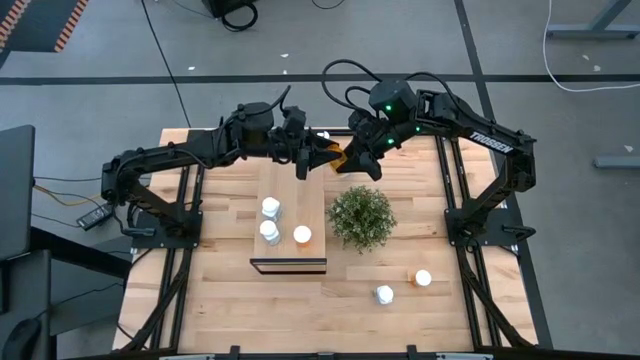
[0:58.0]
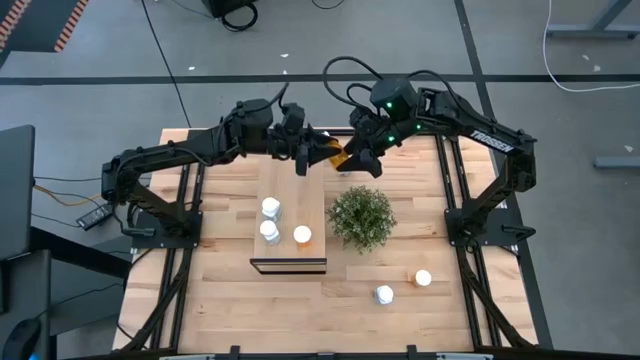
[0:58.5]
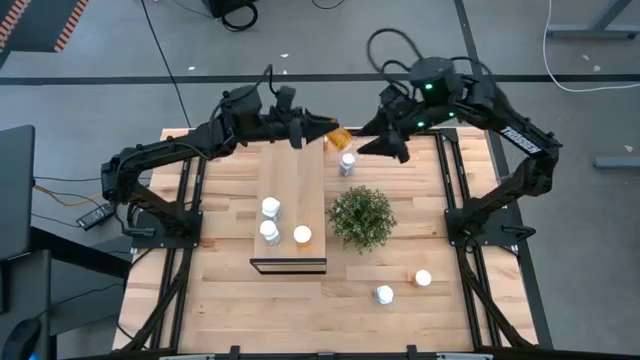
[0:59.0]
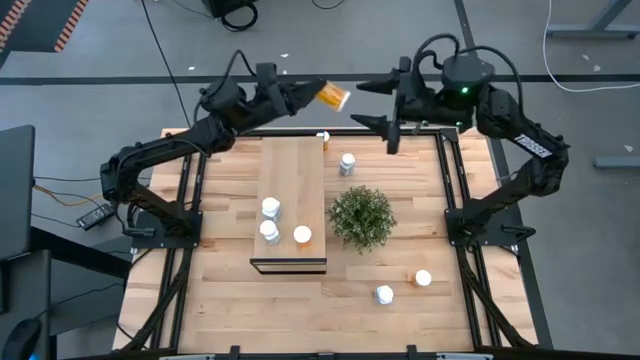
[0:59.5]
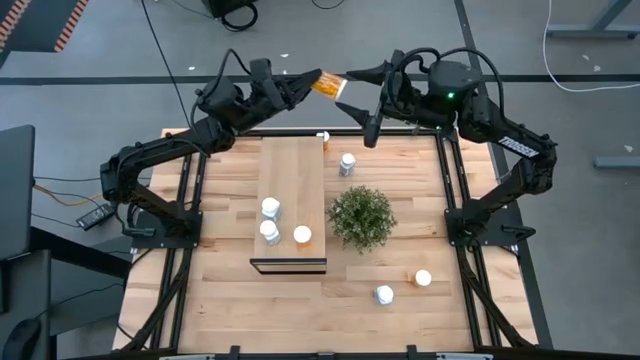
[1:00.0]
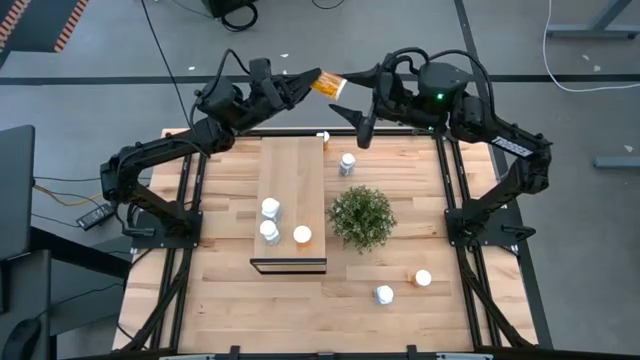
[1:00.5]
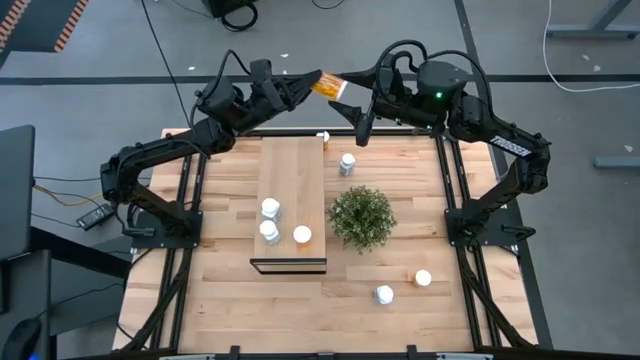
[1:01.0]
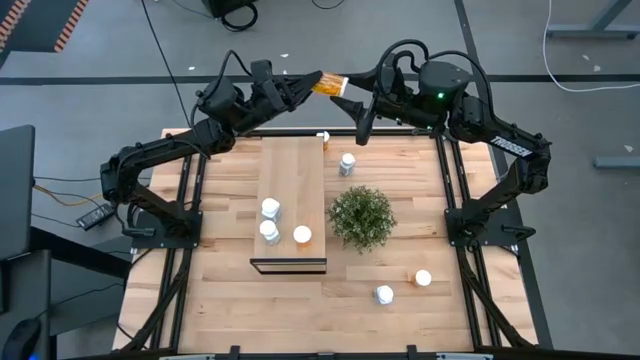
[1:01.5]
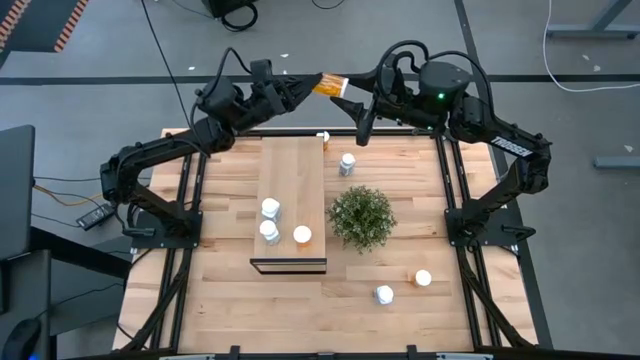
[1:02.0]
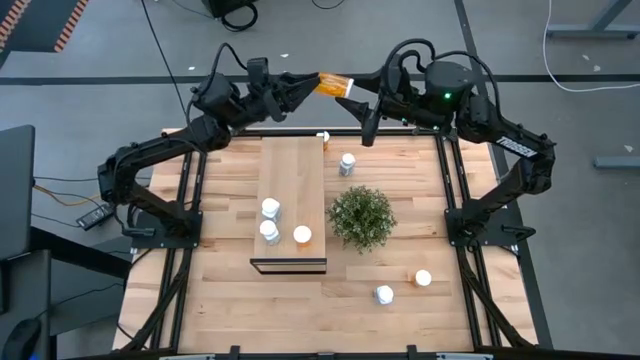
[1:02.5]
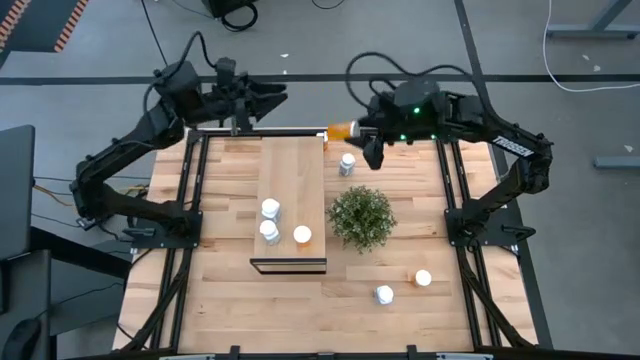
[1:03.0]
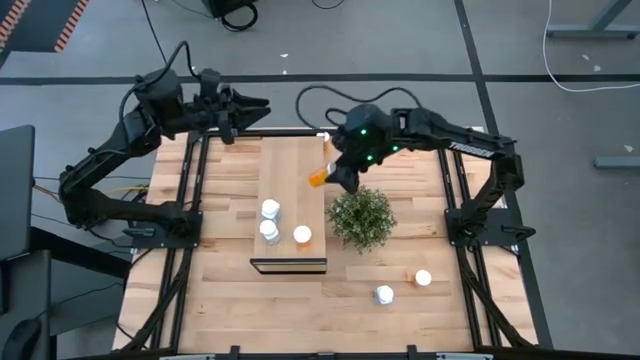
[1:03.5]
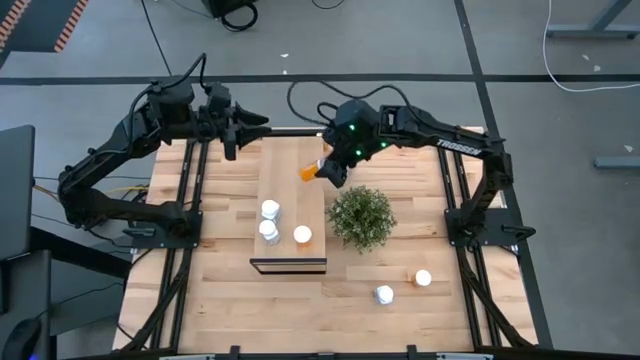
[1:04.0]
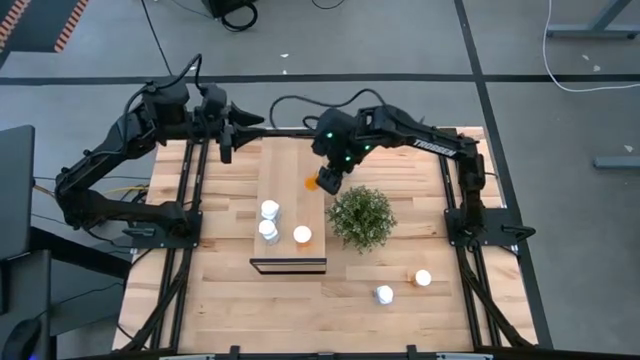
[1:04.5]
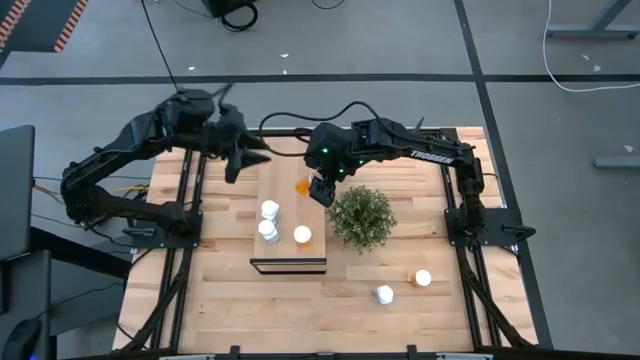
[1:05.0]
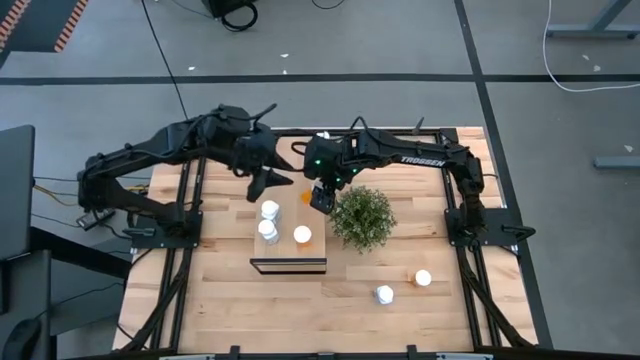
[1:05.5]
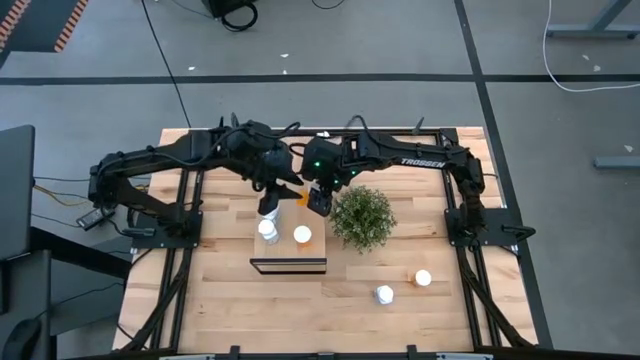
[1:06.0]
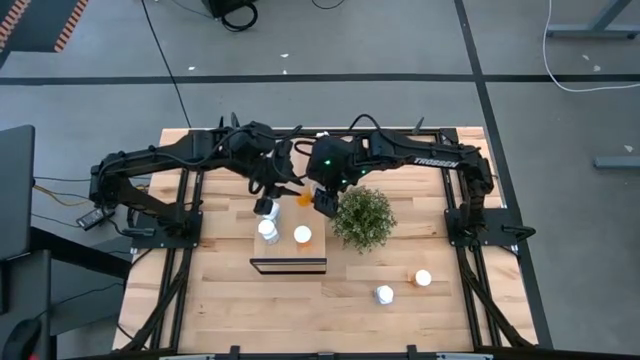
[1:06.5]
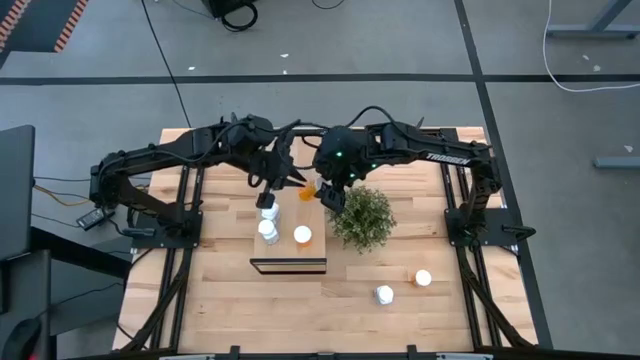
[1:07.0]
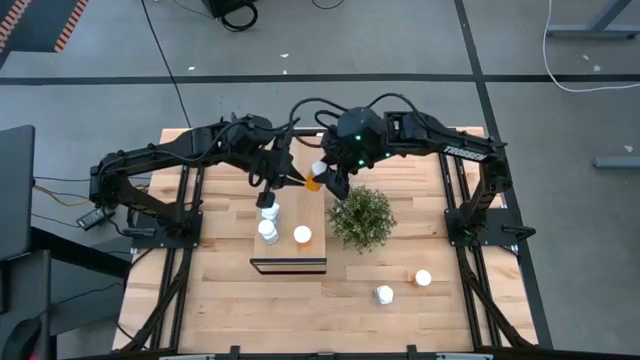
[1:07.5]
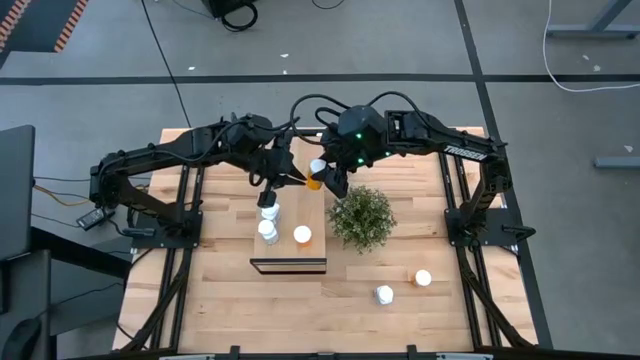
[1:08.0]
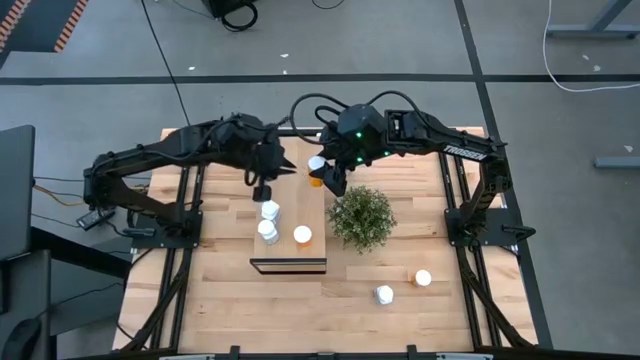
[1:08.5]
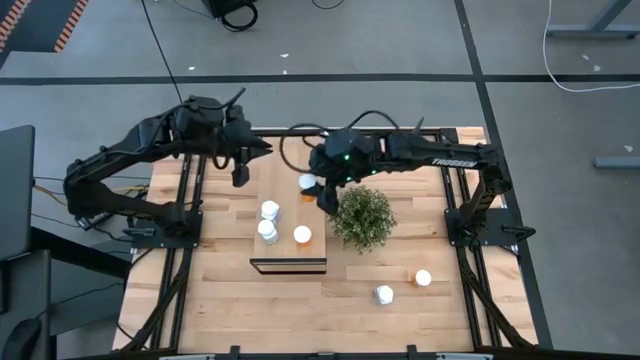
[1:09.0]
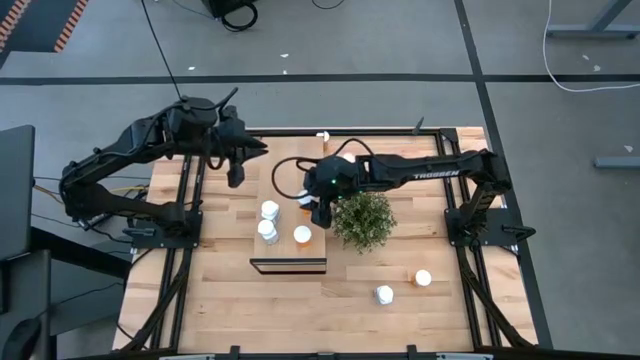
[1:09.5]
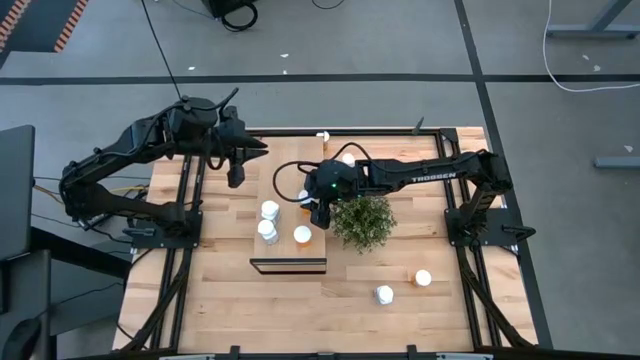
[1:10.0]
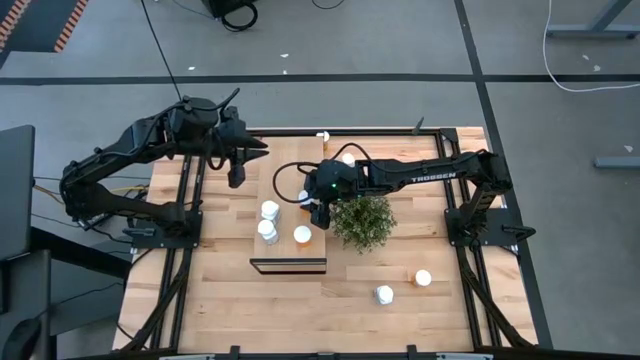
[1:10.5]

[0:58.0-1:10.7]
Task: Pick and place medicine bottles onto shelf by color
Put the top right orange pill bottle on the shelf aligned with the other orange pill bottle

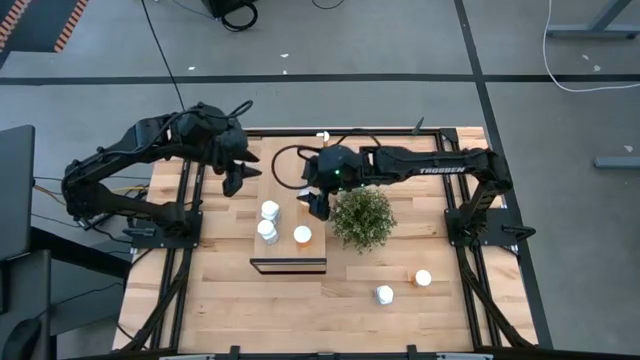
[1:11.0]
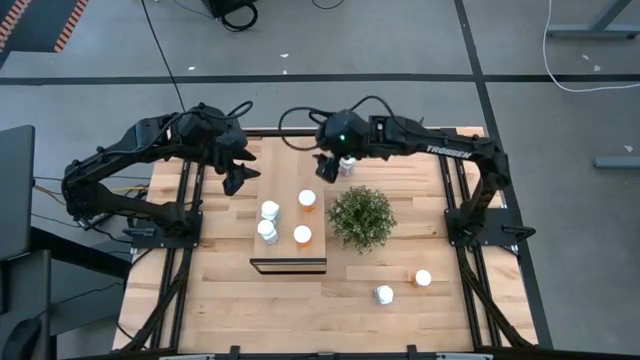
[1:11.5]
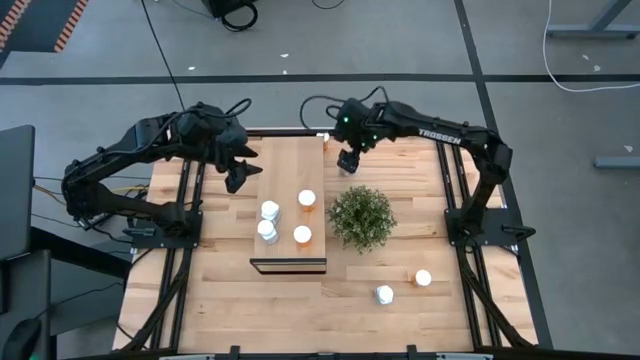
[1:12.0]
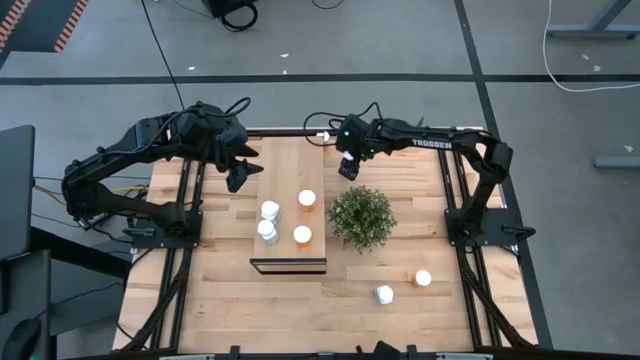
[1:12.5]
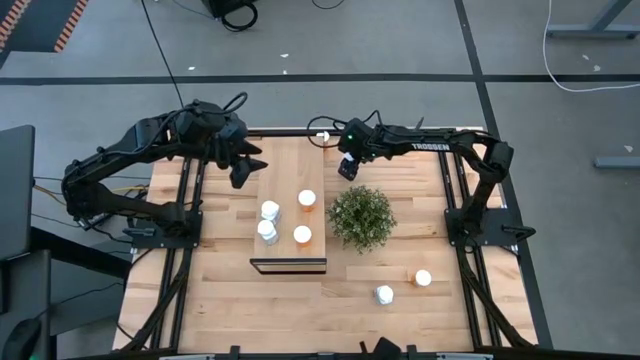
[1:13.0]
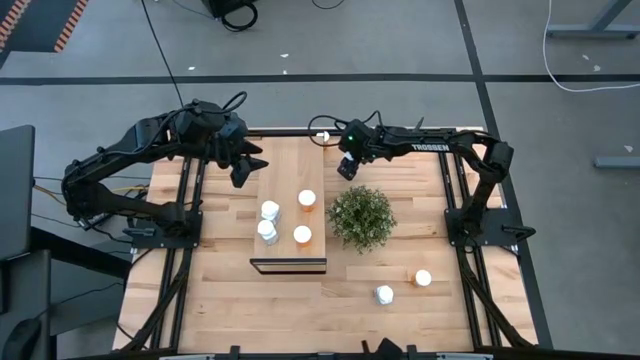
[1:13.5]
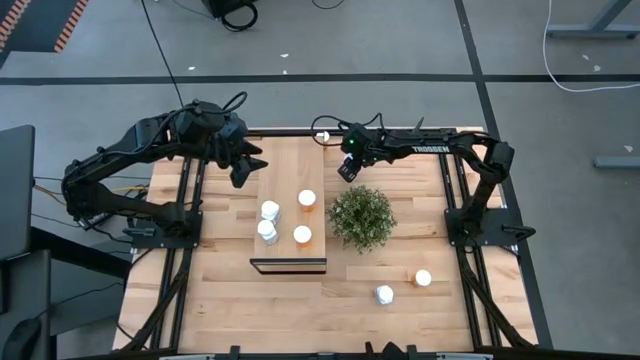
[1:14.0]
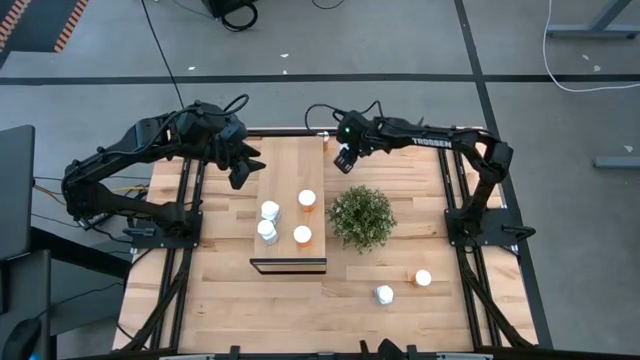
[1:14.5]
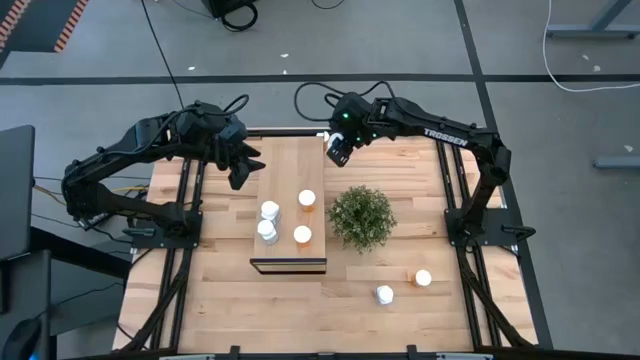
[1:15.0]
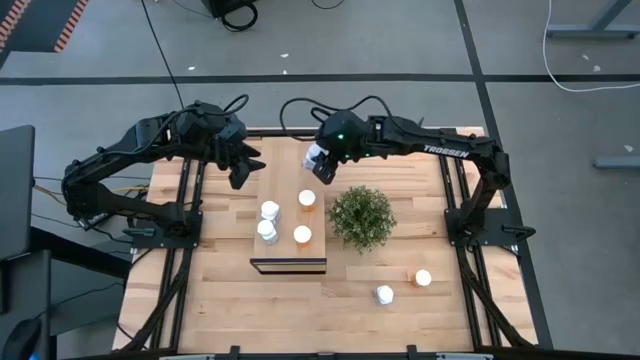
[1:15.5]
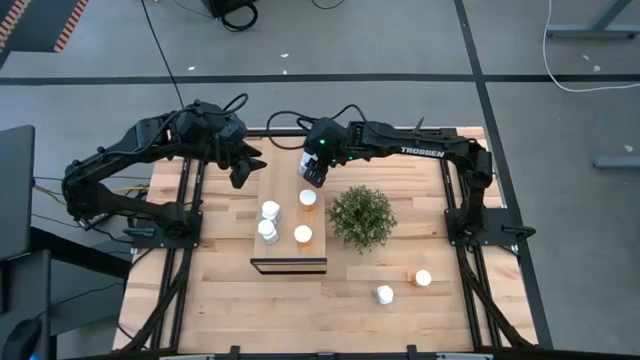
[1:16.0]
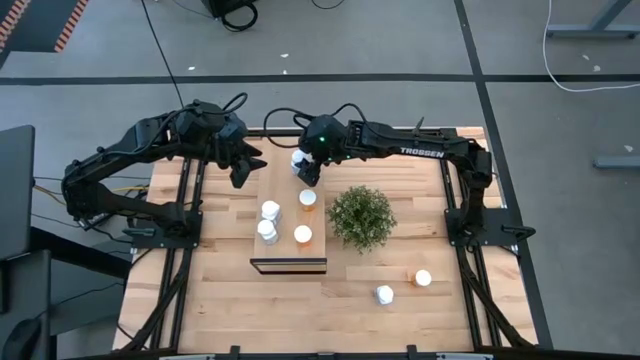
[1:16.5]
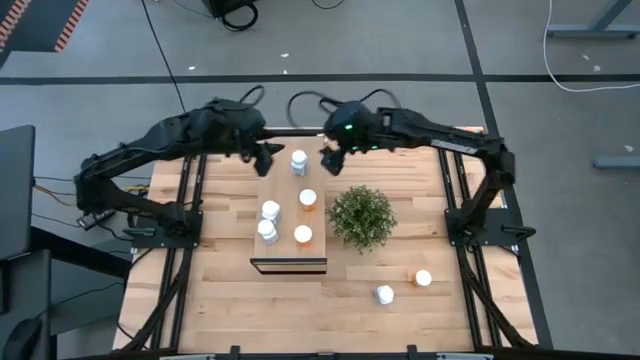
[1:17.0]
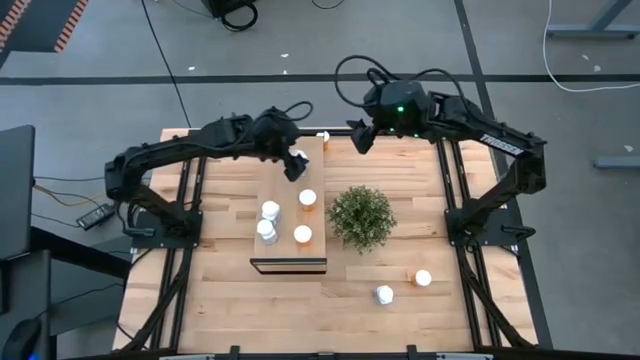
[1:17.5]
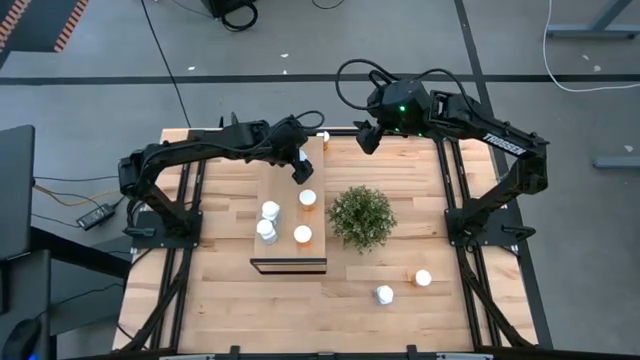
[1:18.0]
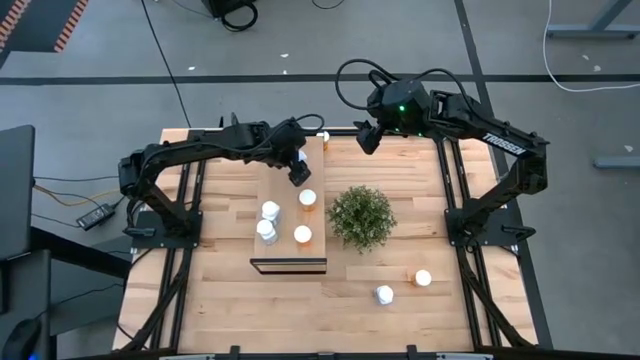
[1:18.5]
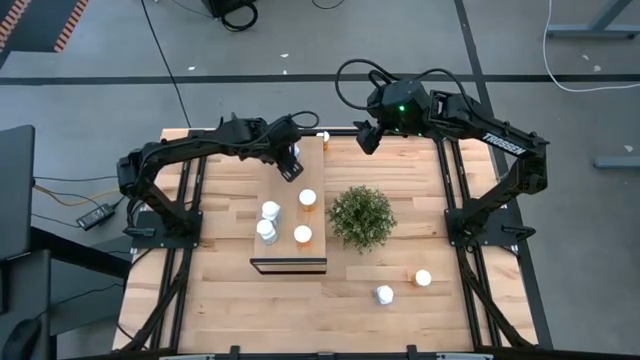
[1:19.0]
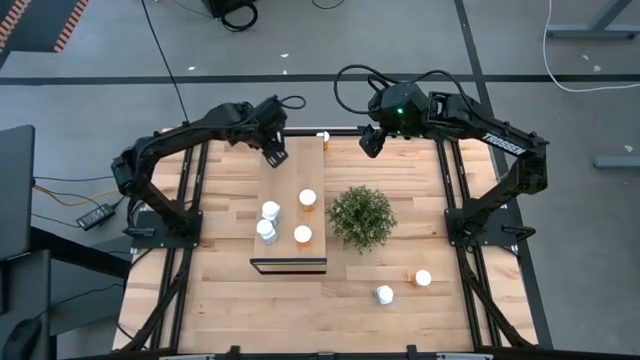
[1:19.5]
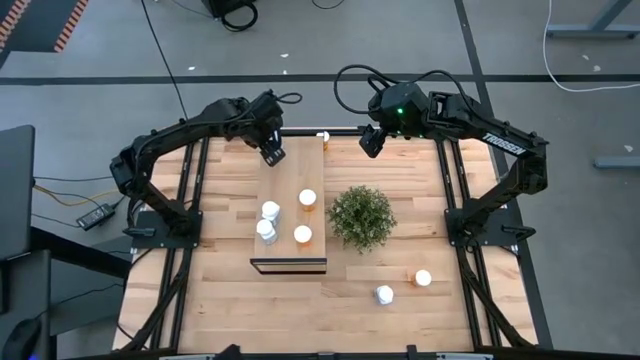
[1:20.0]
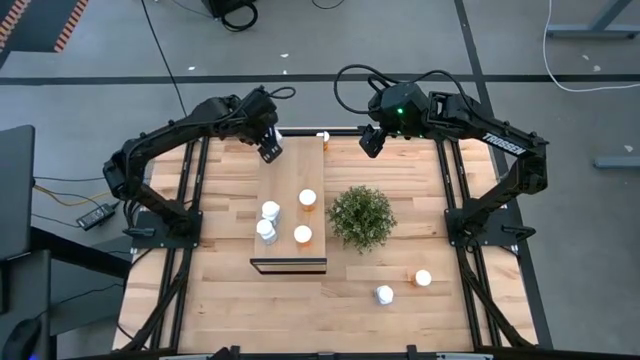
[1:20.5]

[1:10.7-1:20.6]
Put the top white pill bottle on the shelf aligned with the other white pill bottles
